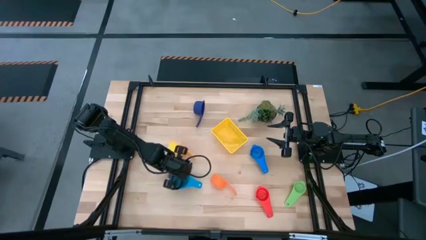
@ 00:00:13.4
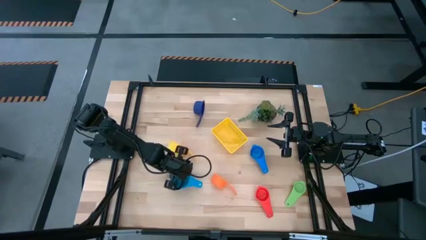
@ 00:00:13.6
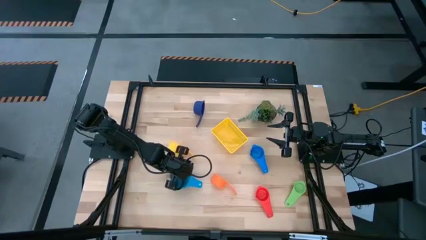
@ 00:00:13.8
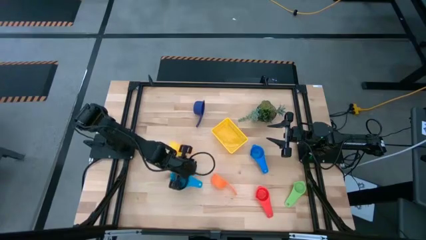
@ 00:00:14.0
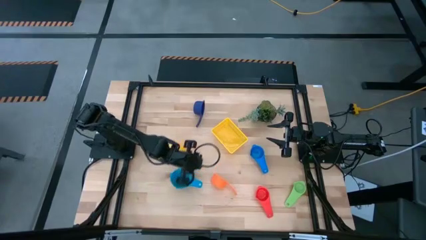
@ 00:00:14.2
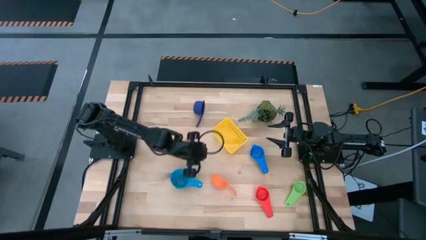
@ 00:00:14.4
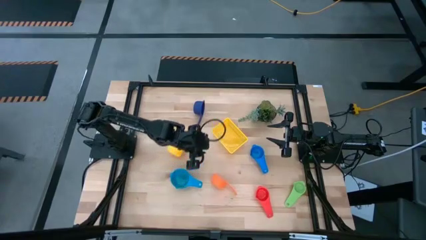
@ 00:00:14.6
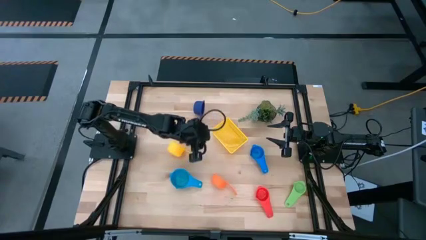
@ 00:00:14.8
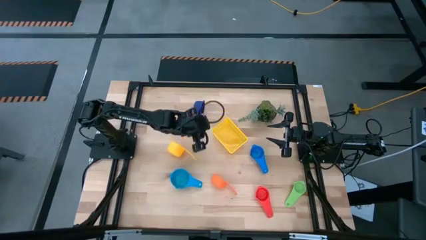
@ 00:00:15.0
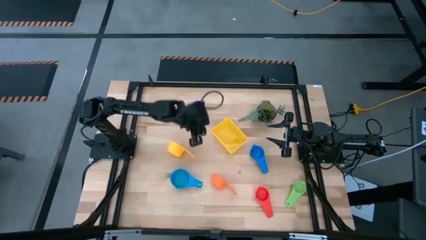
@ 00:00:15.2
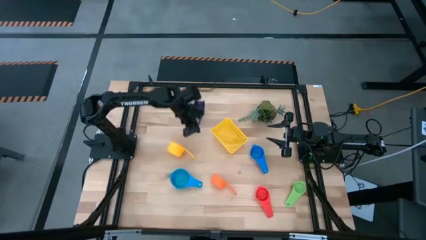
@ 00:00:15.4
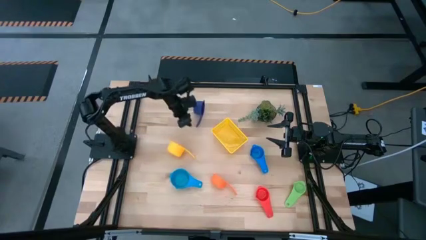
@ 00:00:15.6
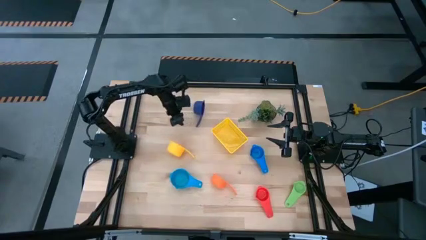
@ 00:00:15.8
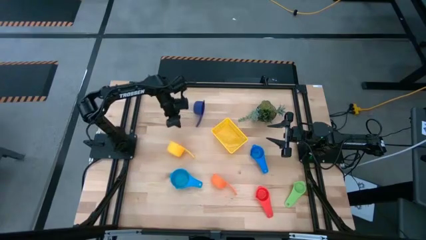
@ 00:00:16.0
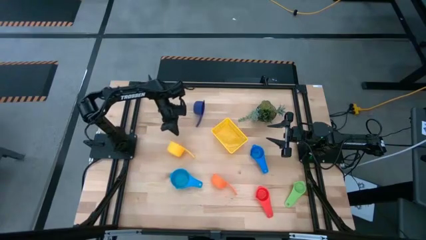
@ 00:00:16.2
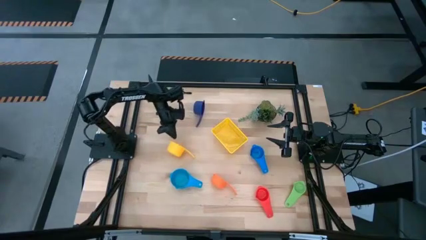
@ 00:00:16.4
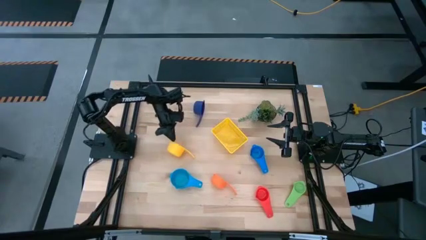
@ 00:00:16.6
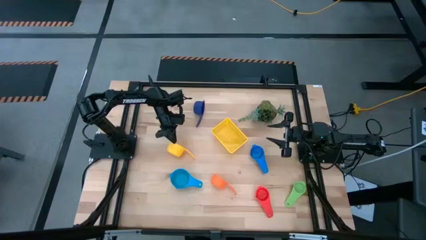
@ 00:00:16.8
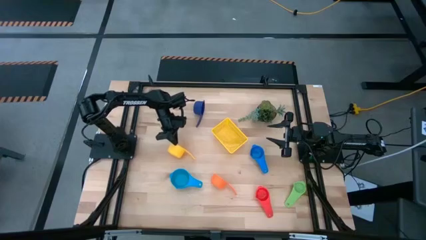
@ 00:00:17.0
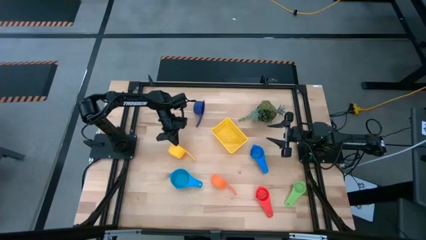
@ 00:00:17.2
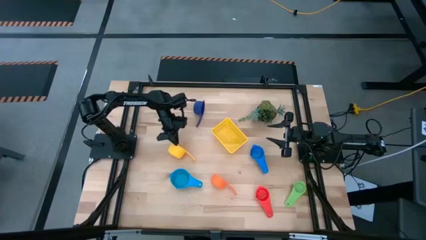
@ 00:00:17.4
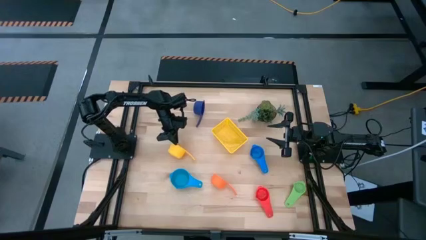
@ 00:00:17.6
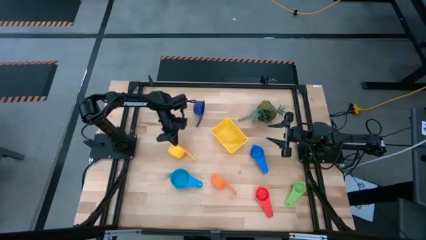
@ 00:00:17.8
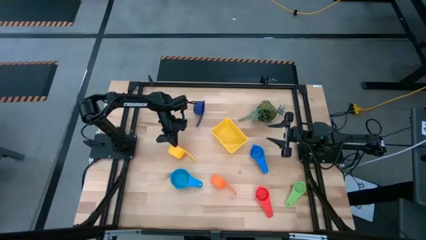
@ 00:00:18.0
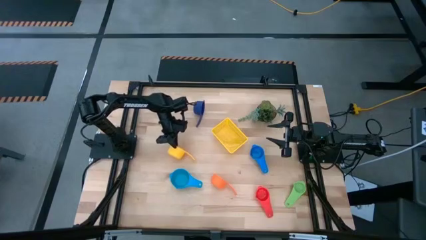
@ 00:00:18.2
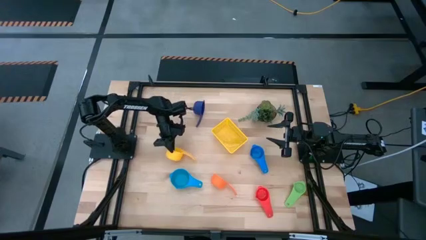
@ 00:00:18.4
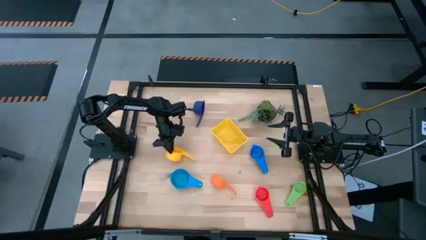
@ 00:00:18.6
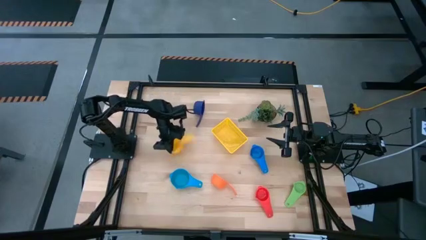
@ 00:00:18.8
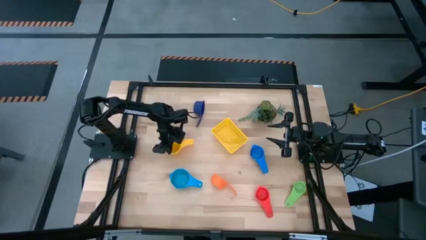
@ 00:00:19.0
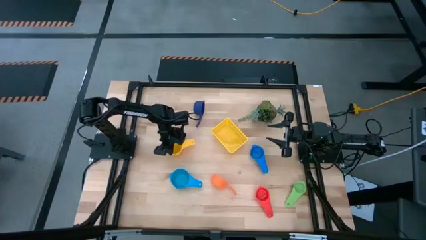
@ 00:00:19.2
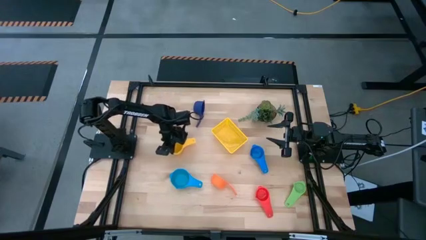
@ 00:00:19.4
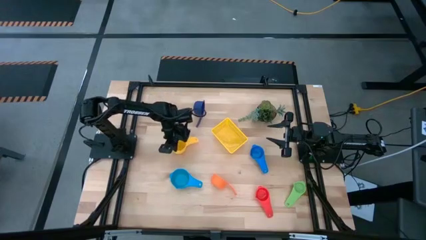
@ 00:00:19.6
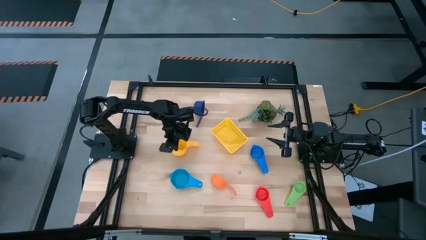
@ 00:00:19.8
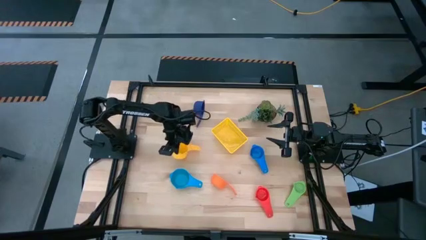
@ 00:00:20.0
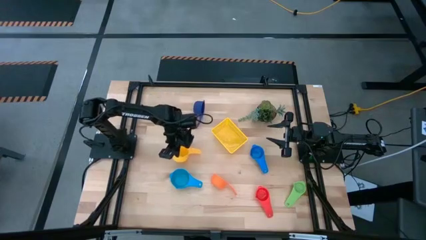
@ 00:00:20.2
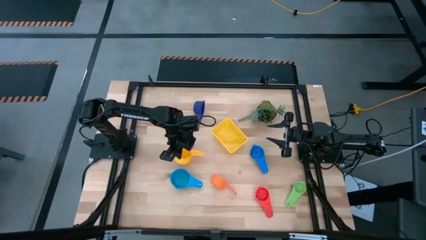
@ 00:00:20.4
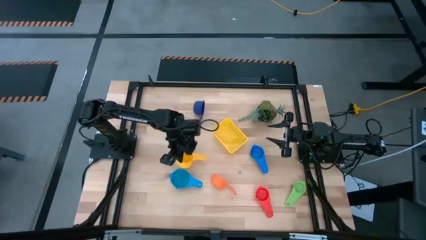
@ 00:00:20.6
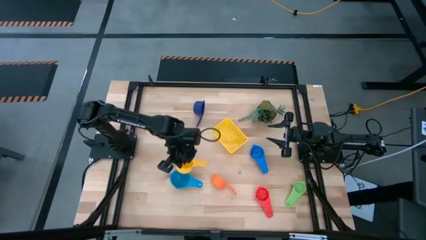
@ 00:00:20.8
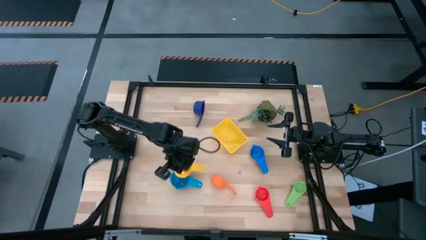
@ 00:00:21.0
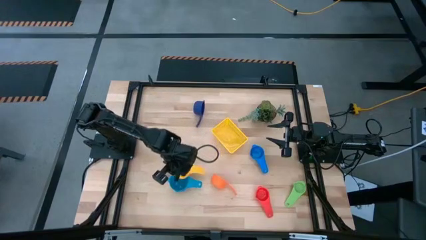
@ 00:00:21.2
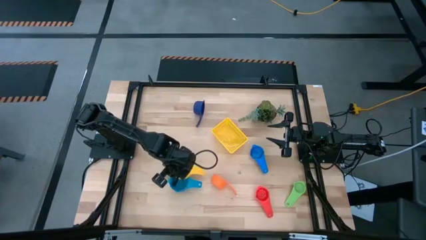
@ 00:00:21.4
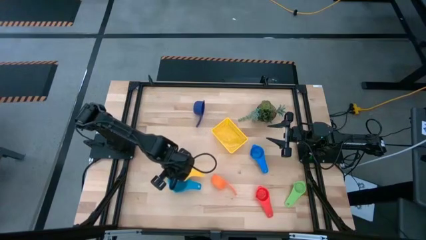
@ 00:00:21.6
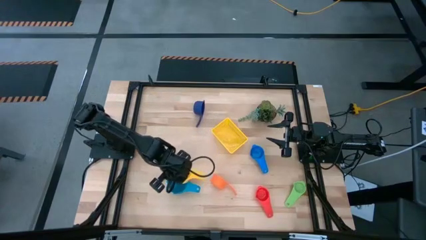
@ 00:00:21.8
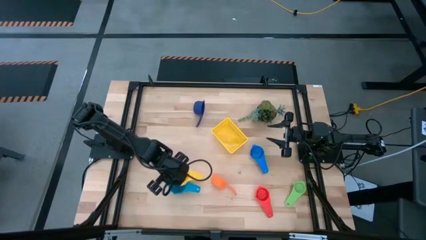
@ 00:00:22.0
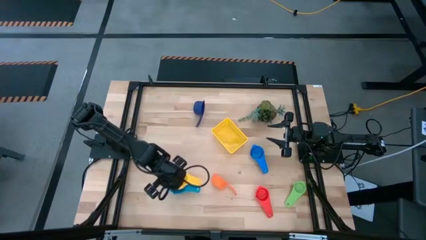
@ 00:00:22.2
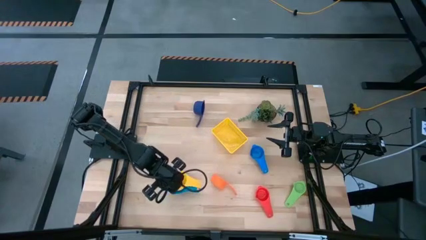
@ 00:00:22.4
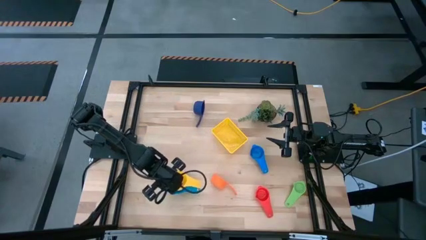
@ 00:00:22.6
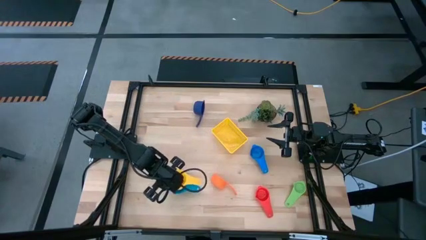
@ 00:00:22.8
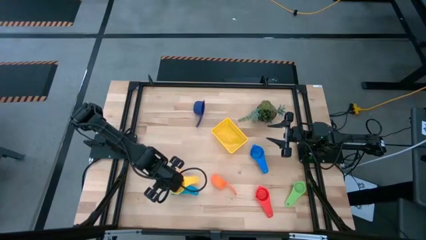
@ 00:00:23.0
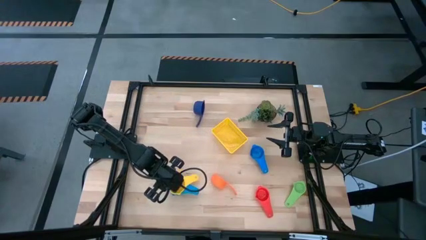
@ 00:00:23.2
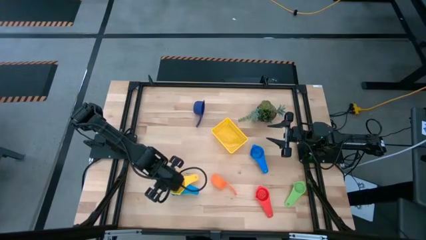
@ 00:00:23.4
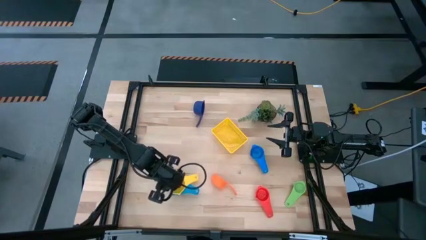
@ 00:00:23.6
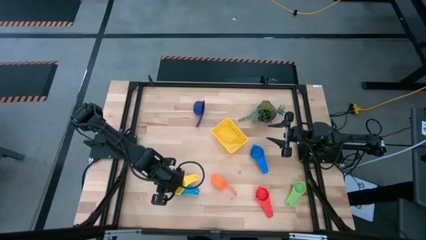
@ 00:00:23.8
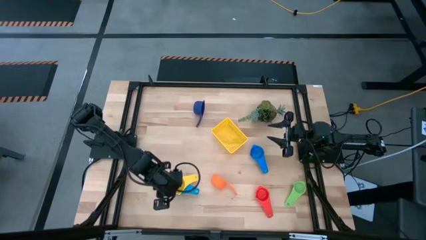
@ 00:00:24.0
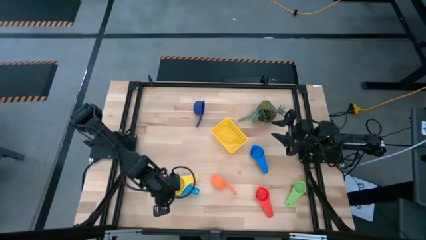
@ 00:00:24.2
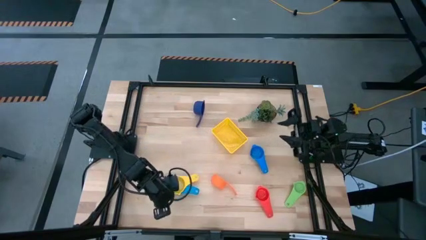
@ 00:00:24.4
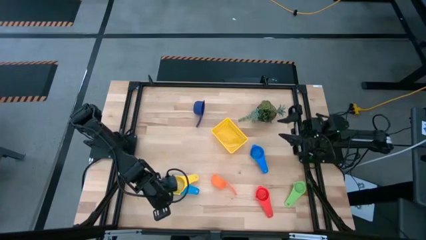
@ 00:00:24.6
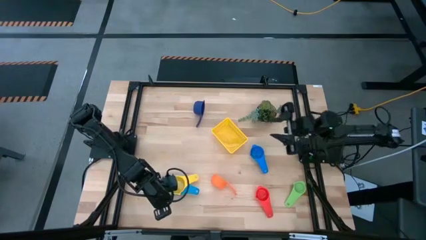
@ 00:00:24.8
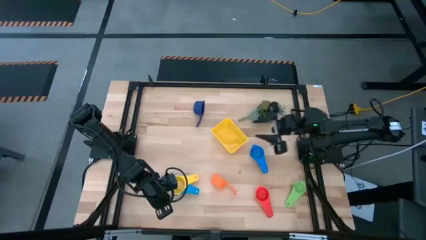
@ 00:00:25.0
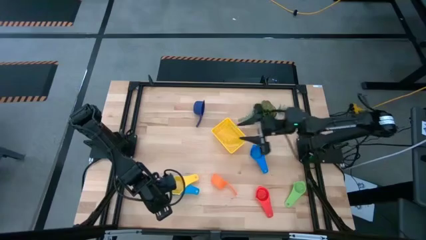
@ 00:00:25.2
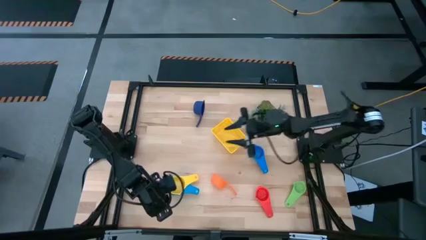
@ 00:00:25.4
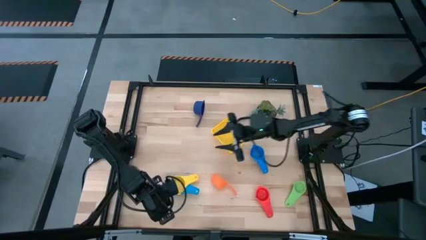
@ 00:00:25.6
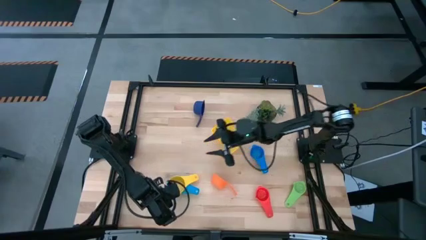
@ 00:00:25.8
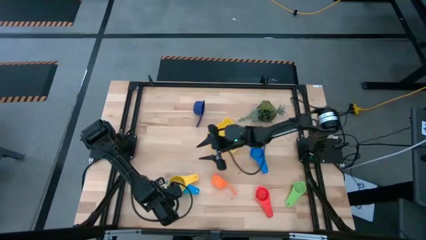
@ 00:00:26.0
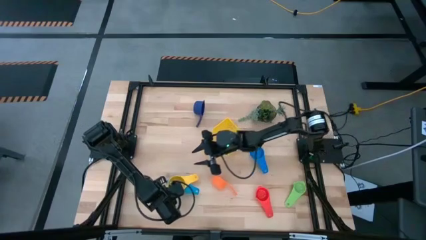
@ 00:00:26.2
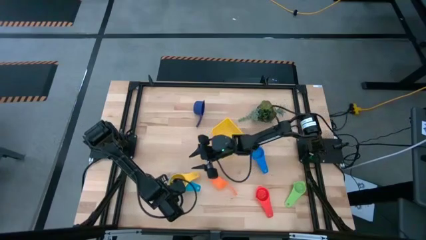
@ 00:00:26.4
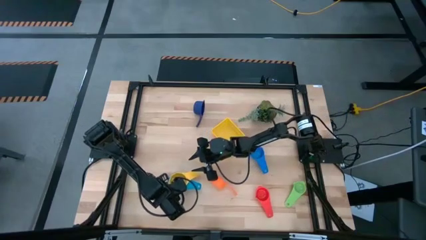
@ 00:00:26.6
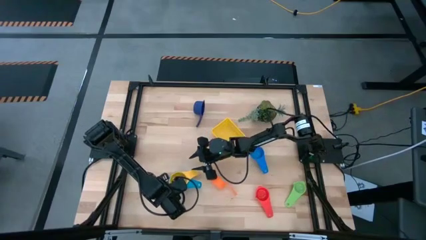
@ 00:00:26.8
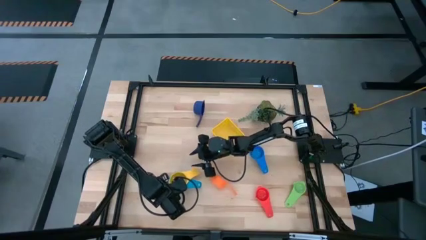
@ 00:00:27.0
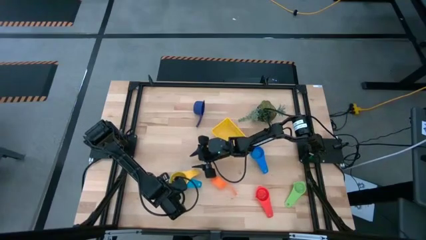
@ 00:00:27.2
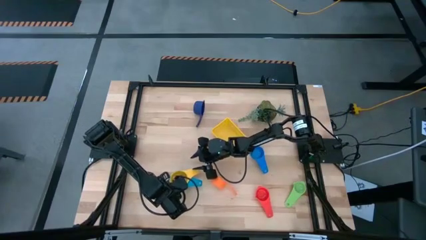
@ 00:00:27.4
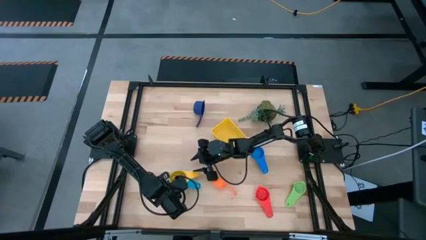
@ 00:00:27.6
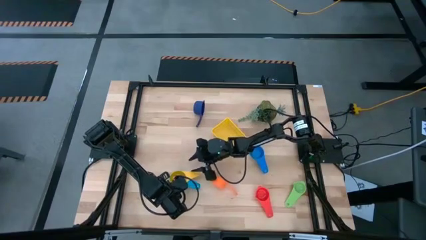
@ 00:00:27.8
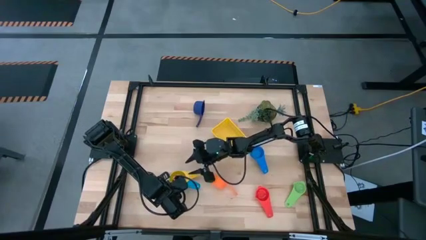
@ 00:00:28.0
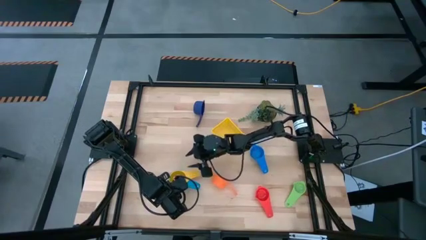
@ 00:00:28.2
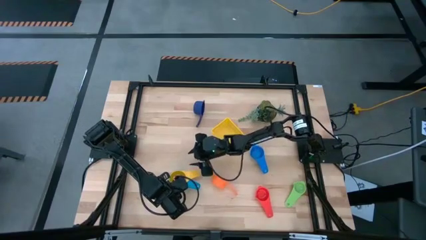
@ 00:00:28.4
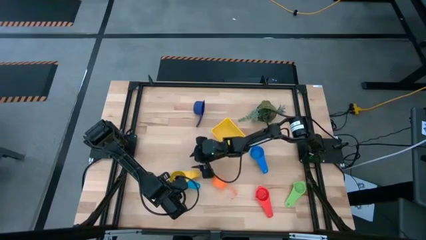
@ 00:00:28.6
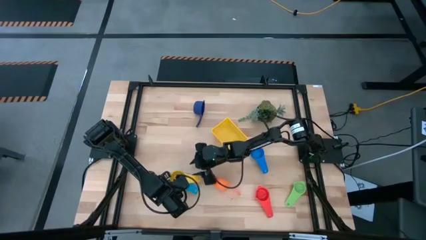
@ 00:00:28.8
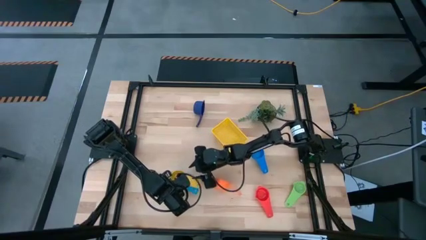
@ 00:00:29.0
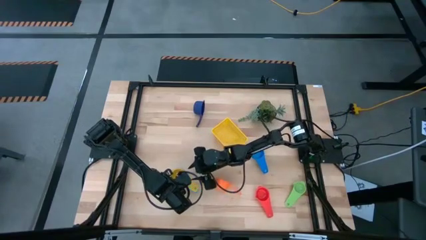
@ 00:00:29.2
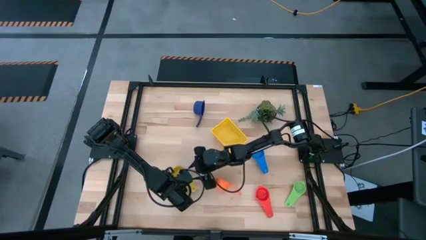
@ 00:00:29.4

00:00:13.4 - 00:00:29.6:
Task: Nest measuring cups in basket
Stack the yellow measuring cup on top of the light blue measuring cup
